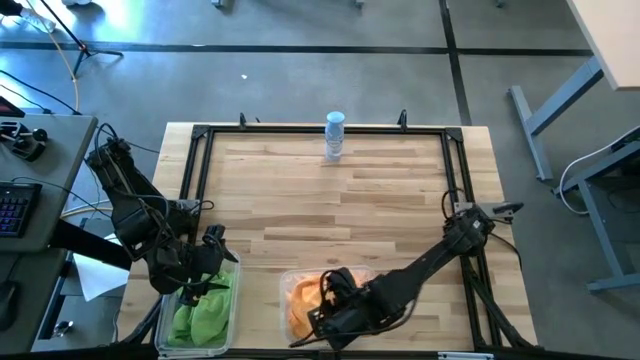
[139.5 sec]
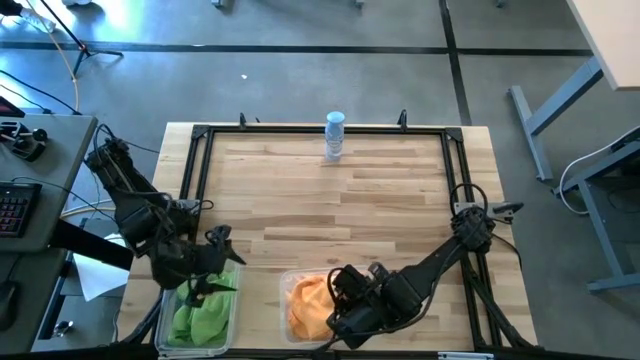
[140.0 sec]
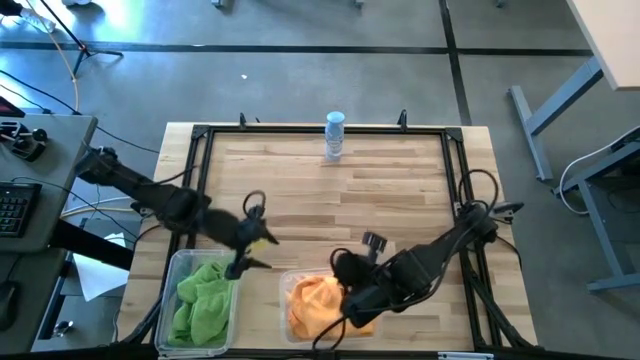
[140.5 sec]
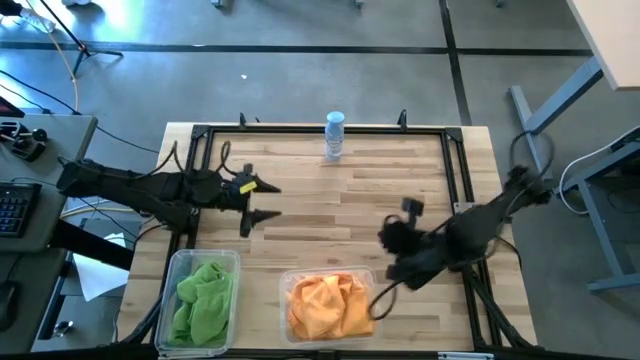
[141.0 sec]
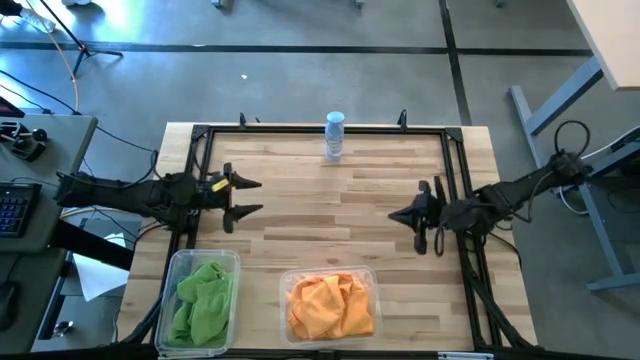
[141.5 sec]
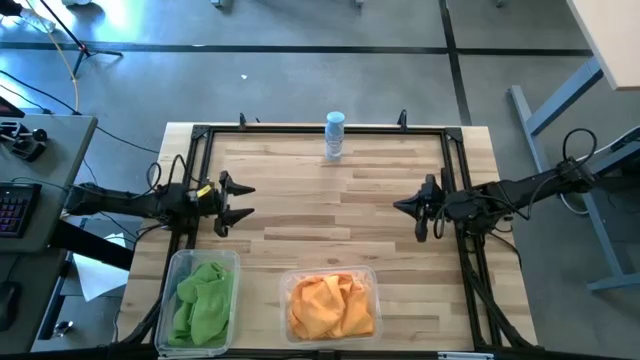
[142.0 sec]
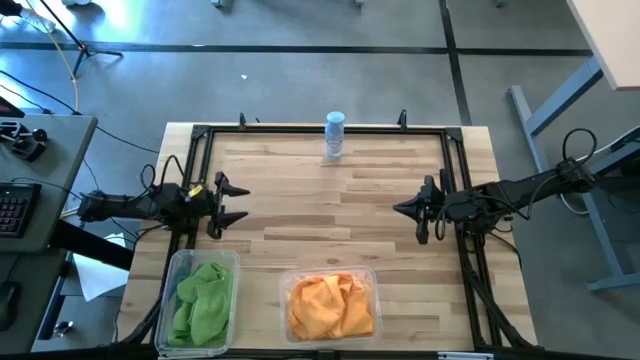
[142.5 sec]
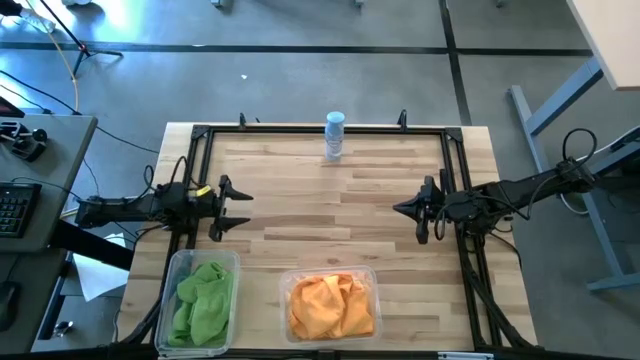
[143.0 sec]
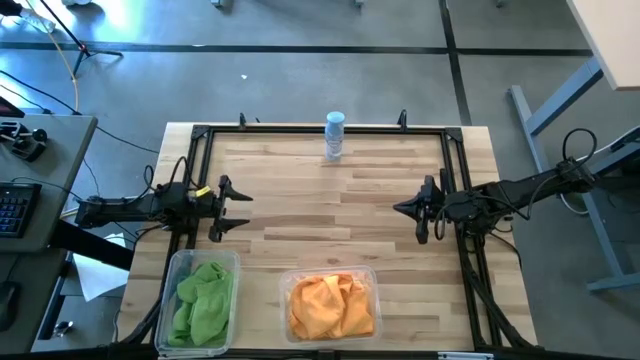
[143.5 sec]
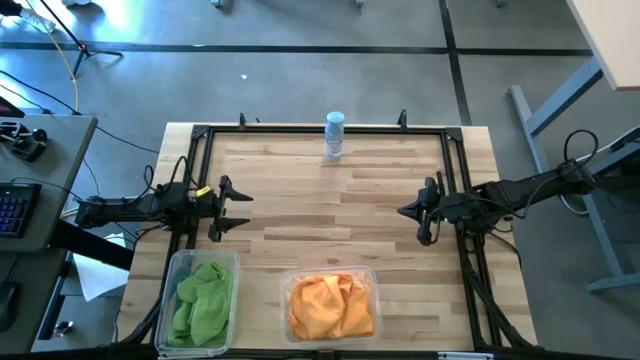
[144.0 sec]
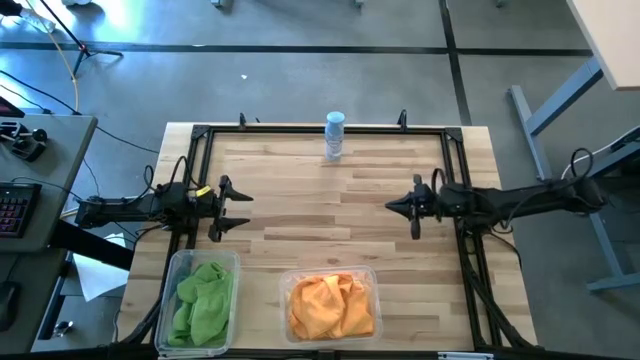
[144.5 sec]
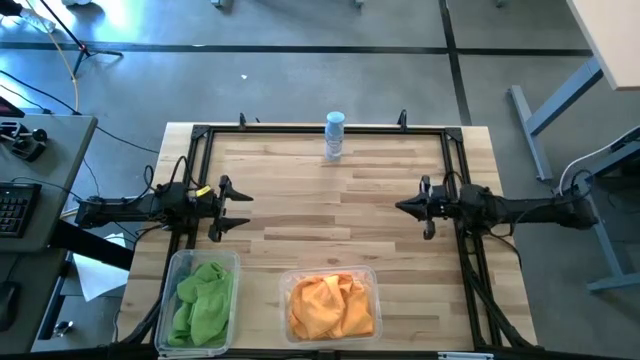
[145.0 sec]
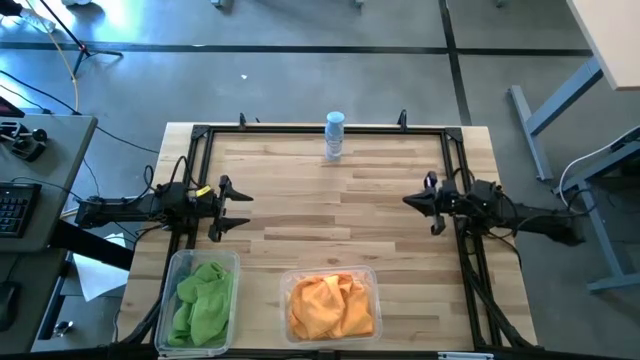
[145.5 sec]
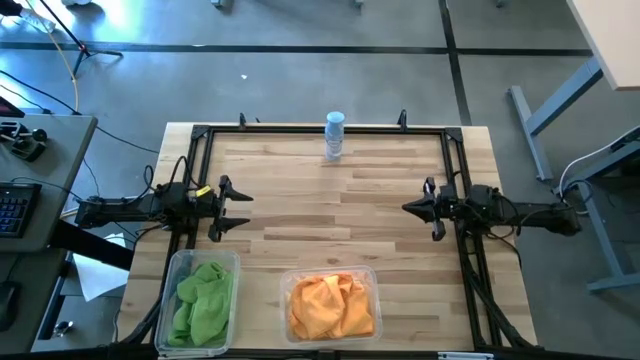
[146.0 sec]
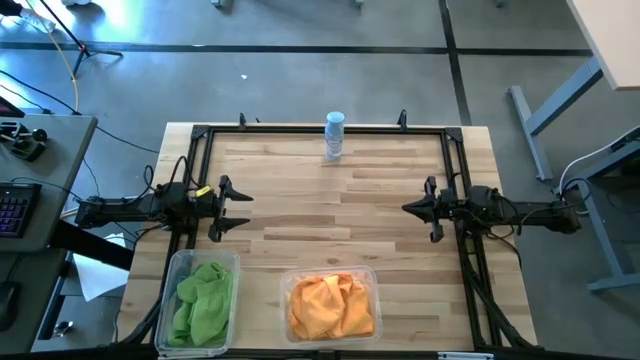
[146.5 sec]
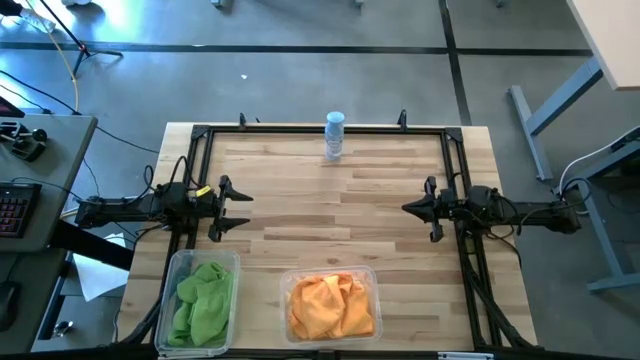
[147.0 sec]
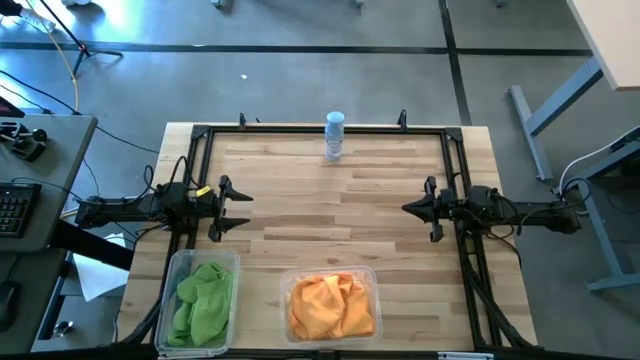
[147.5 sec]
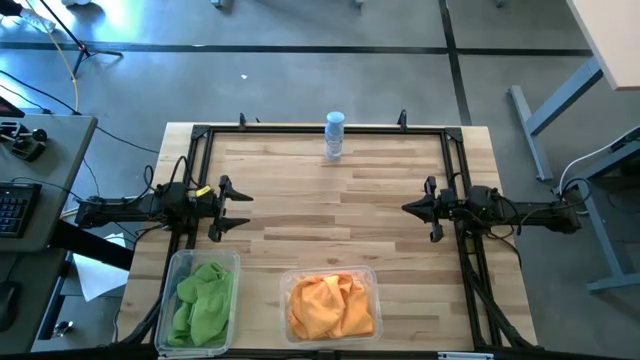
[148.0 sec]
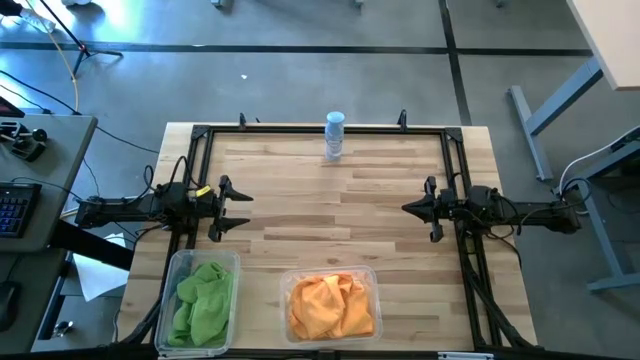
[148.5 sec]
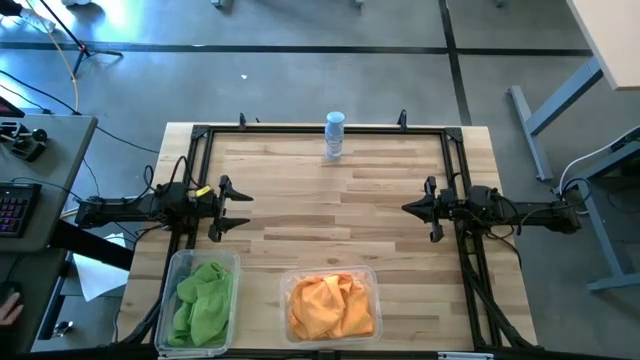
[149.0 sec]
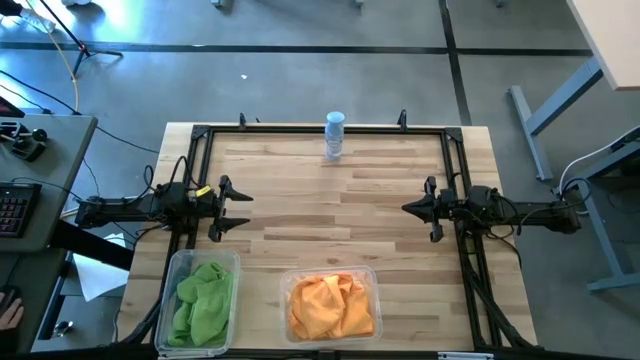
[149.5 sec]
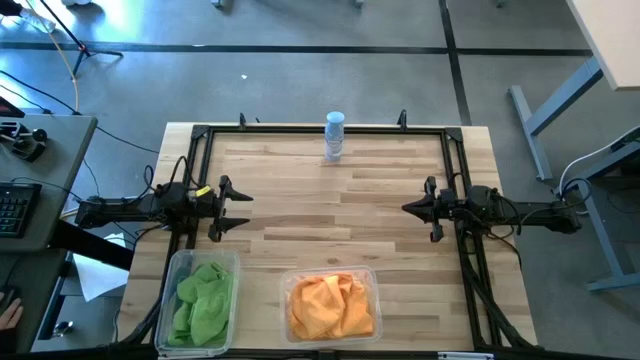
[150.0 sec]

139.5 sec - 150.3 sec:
Task: Sort microfiber towel by color & place in baskets
Return to Home Position

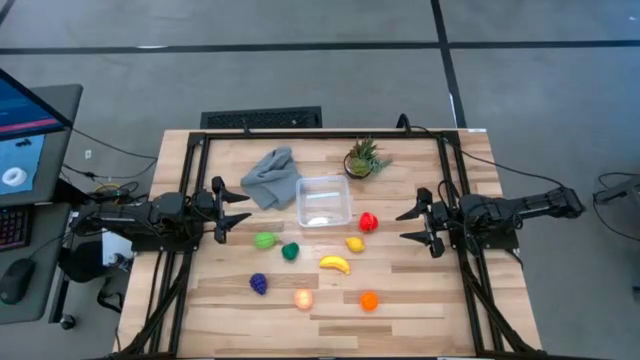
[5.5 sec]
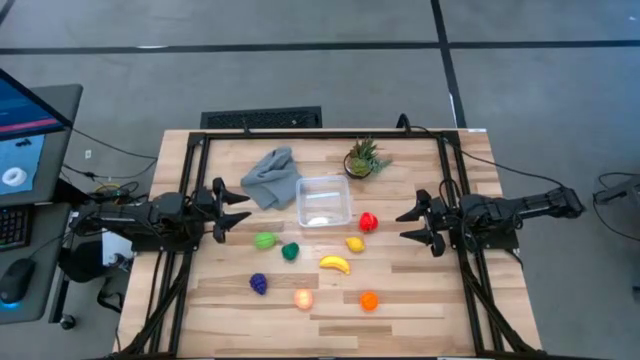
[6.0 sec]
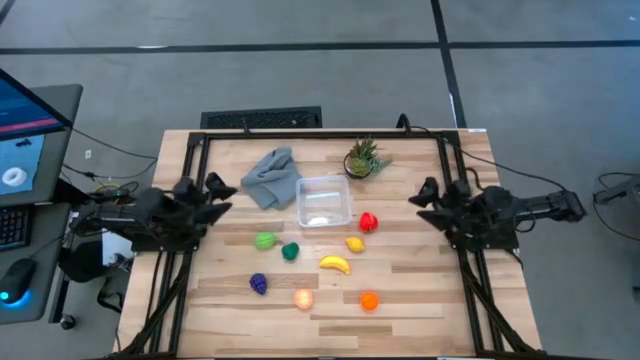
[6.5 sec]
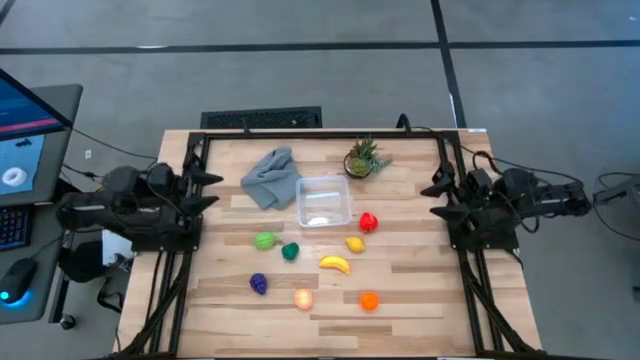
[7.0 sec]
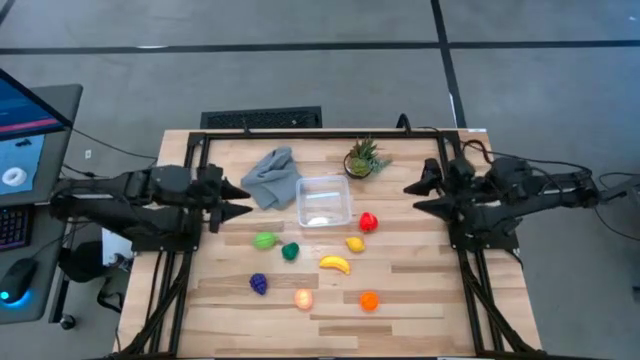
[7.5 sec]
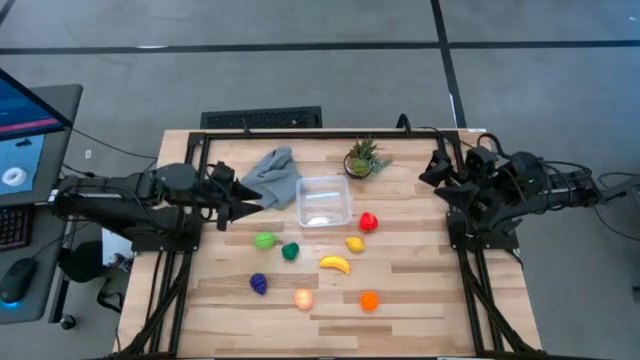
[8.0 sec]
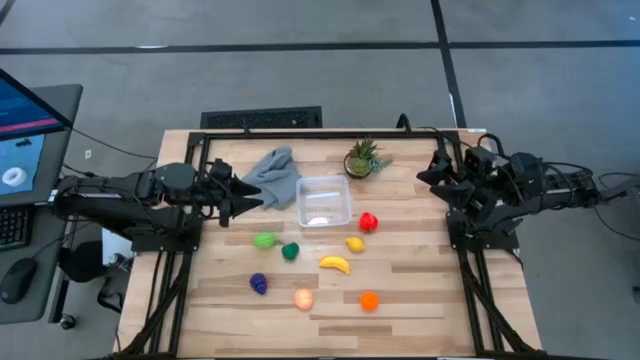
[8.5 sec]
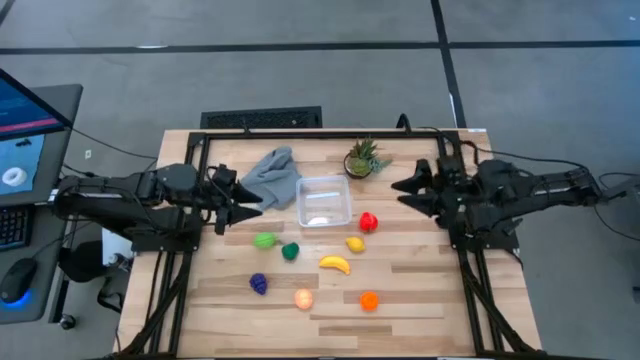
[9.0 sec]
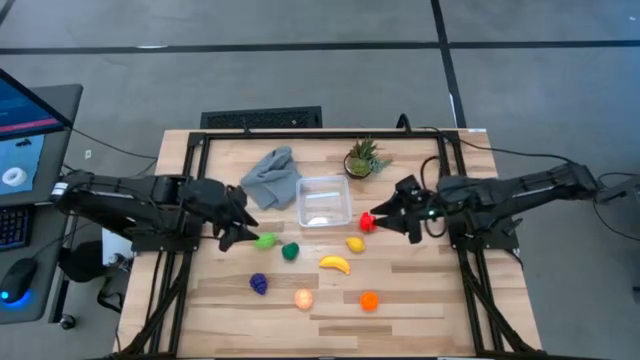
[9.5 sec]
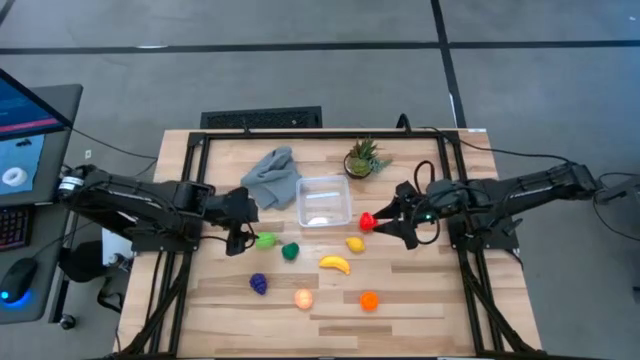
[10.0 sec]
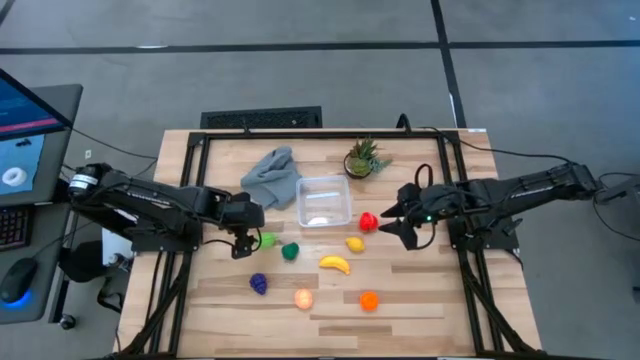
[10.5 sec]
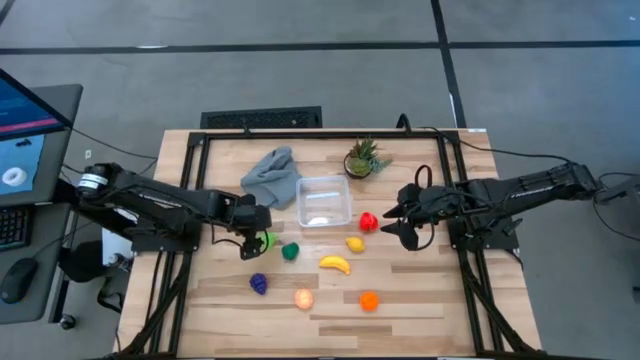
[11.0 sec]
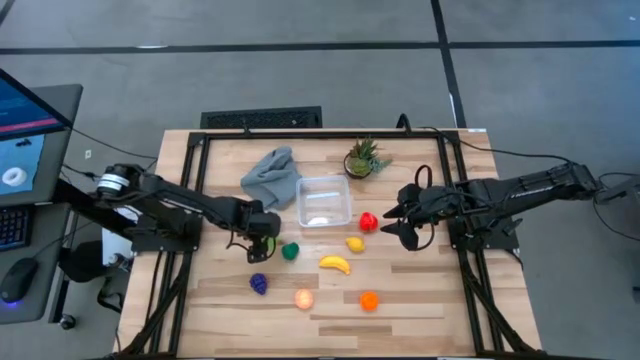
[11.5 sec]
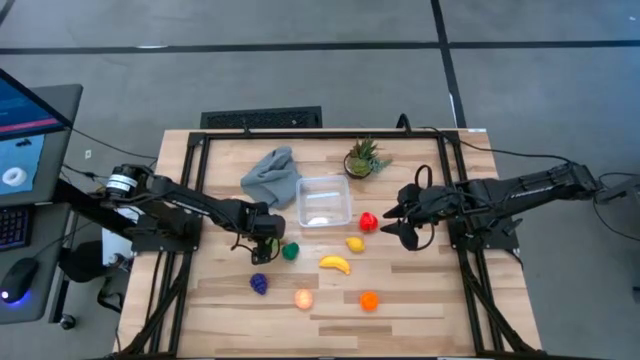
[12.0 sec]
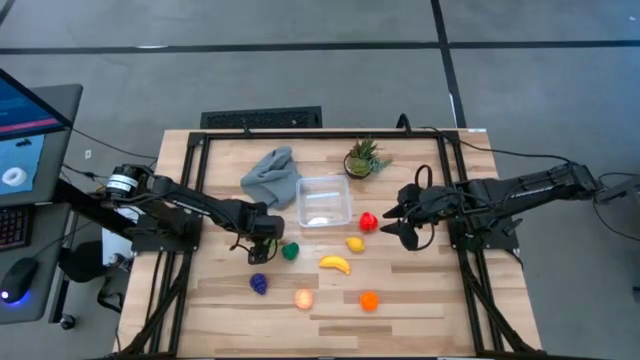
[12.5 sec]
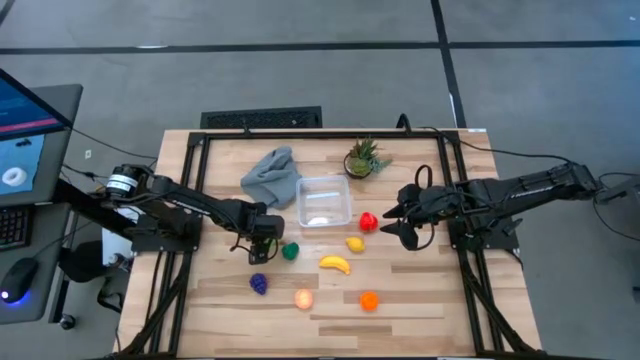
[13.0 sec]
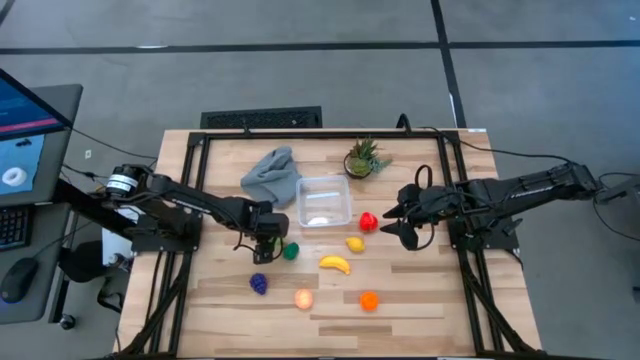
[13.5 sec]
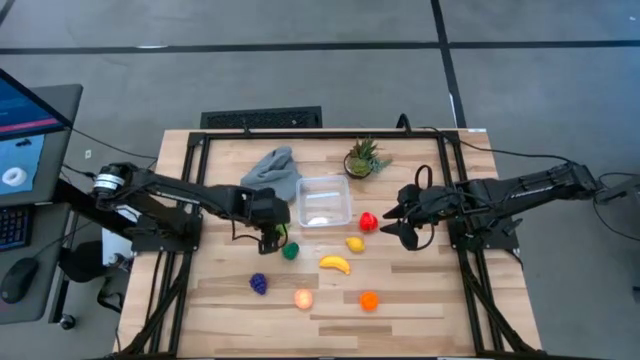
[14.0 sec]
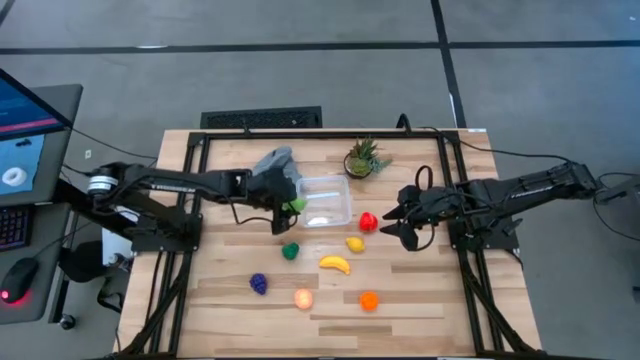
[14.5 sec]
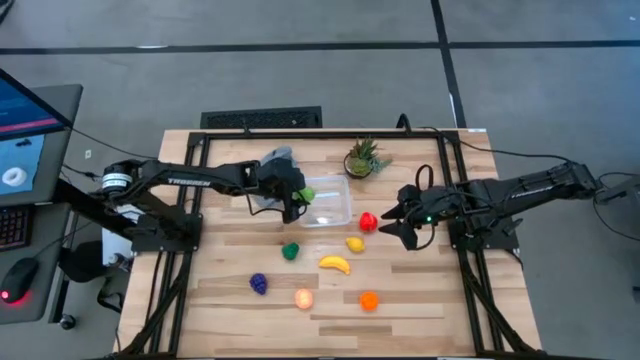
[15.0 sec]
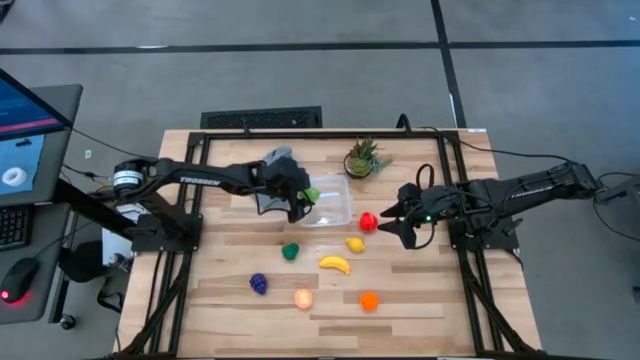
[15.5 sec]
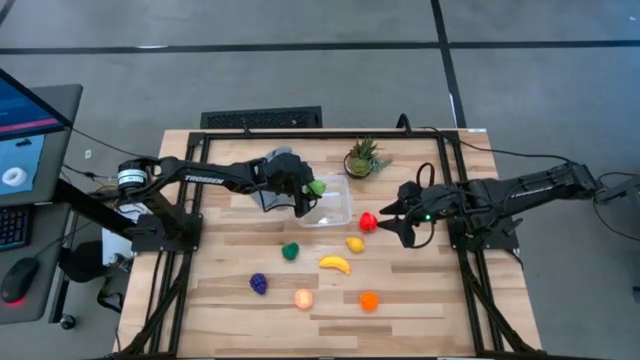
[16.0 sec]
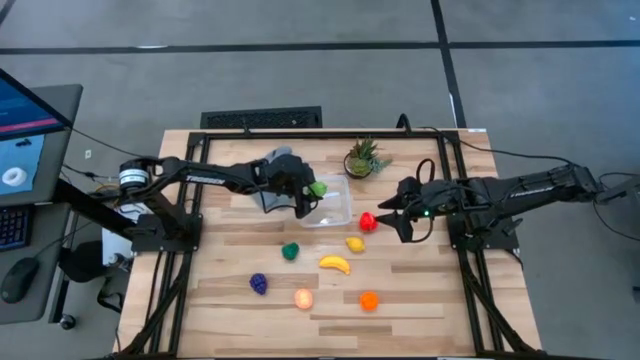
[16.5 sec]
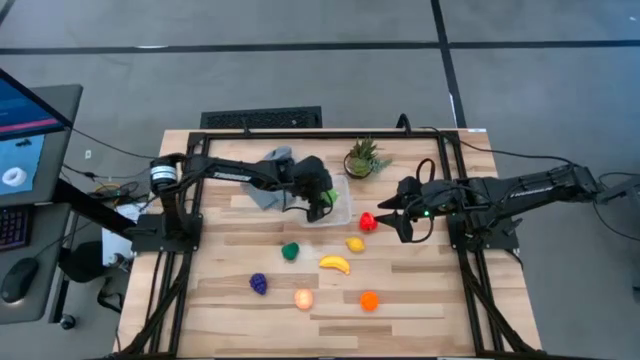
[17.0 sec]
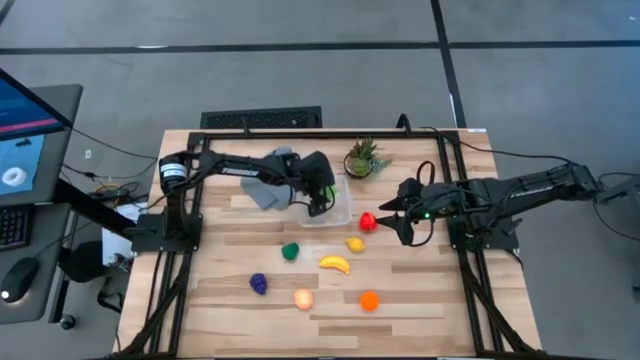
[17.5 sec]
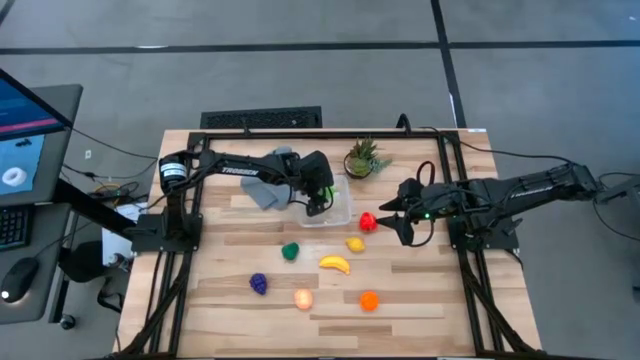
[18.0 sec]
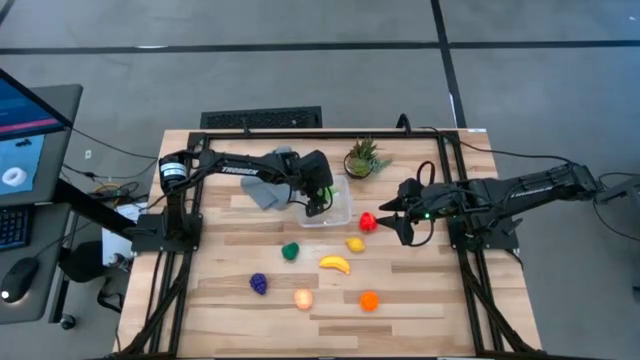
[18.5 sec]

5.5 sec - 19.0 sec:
Task: Pick and placing Produce into tupperware
Put the green melon into the transparent bin
